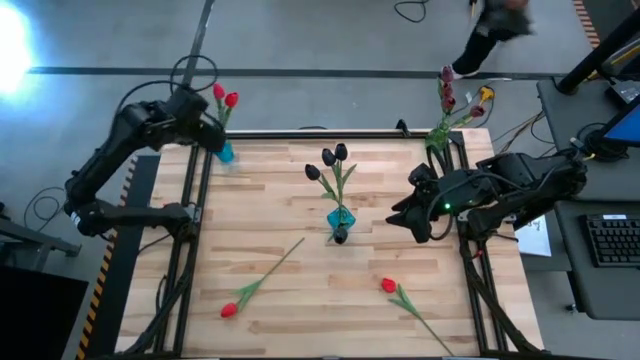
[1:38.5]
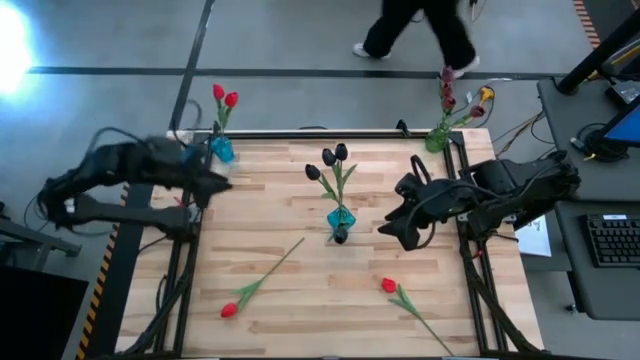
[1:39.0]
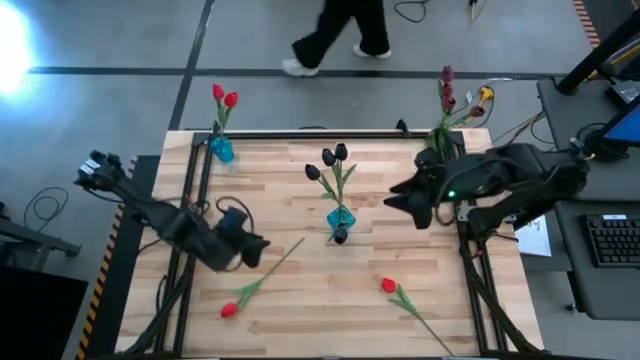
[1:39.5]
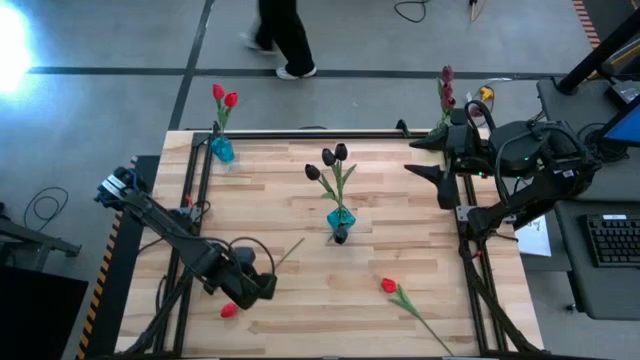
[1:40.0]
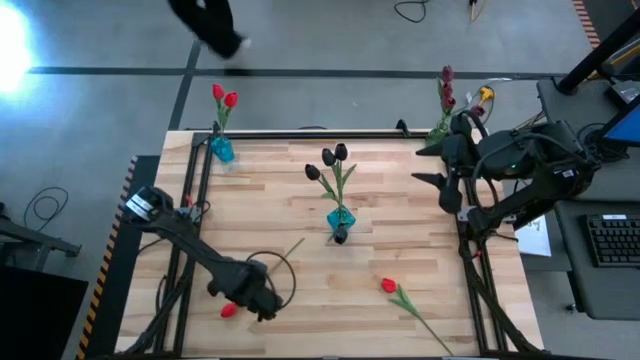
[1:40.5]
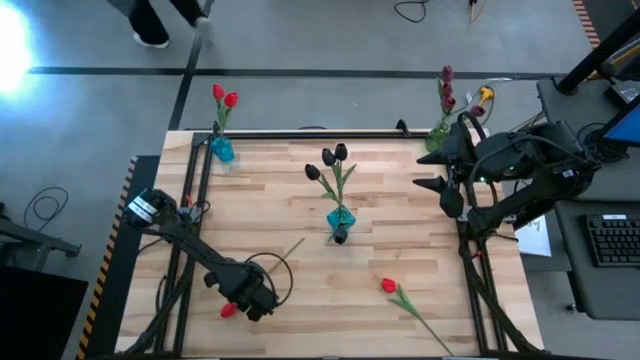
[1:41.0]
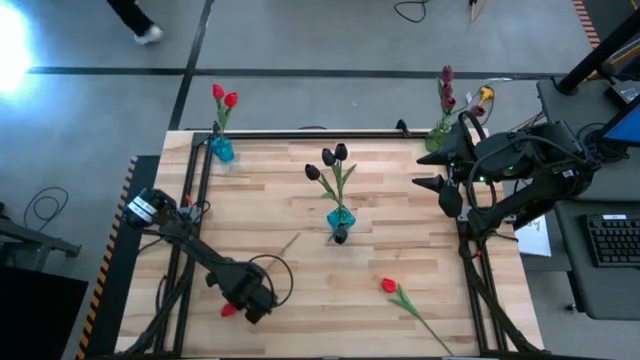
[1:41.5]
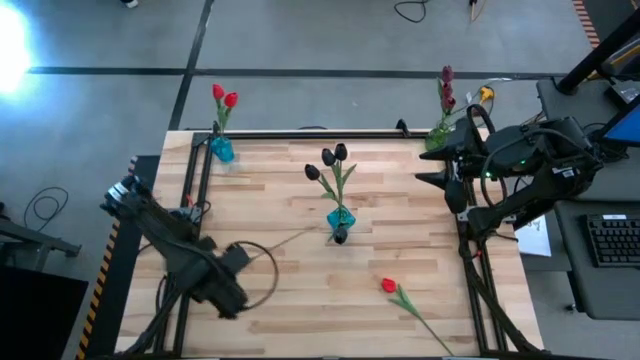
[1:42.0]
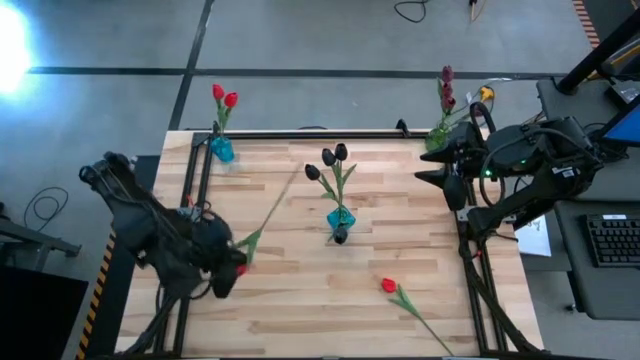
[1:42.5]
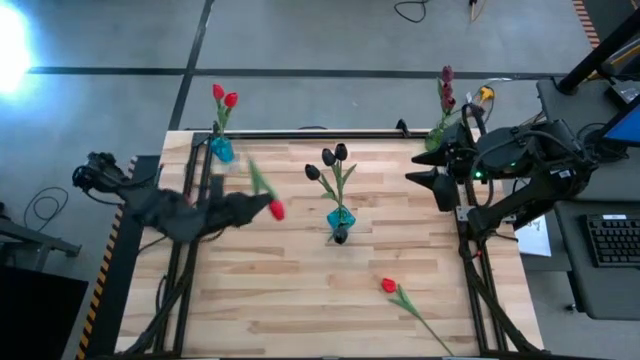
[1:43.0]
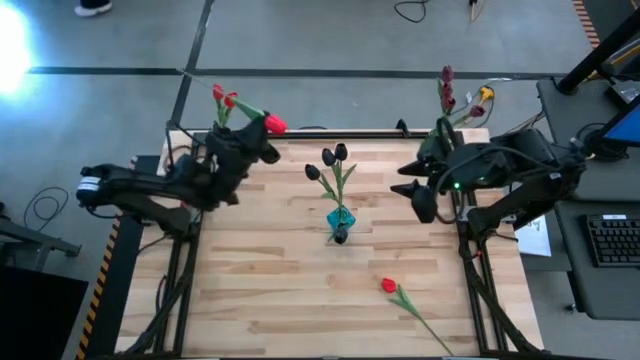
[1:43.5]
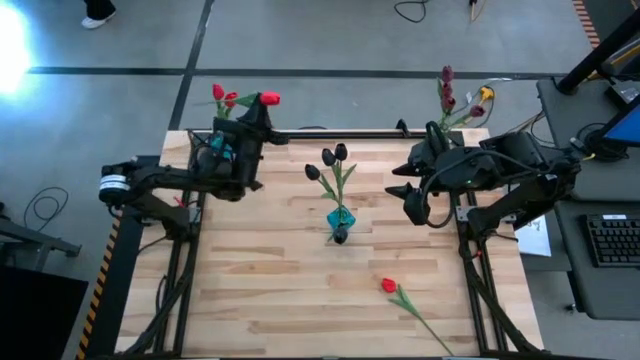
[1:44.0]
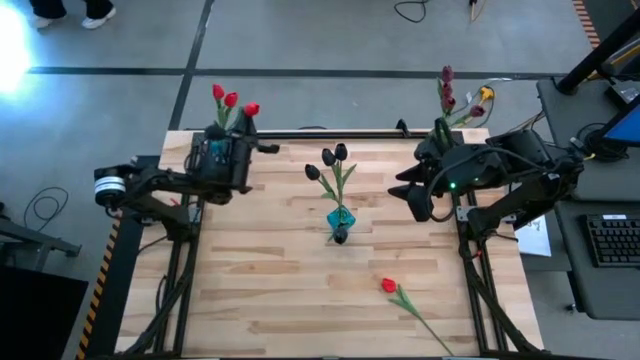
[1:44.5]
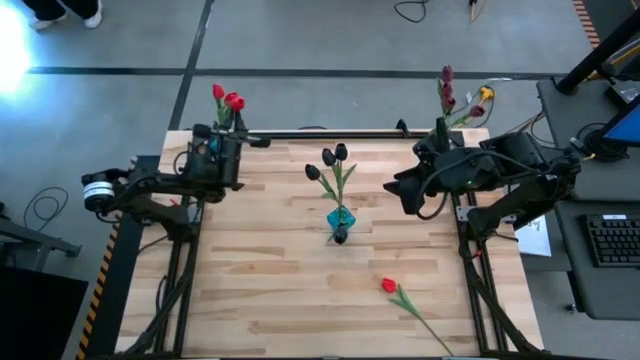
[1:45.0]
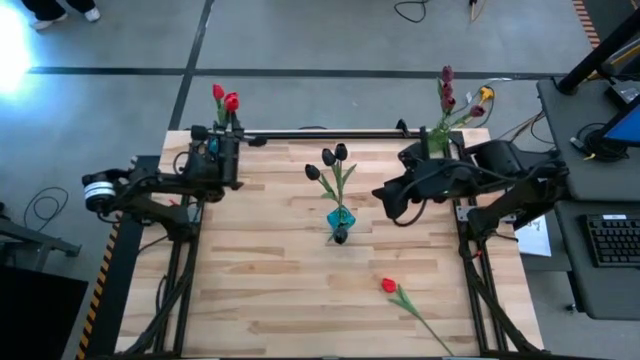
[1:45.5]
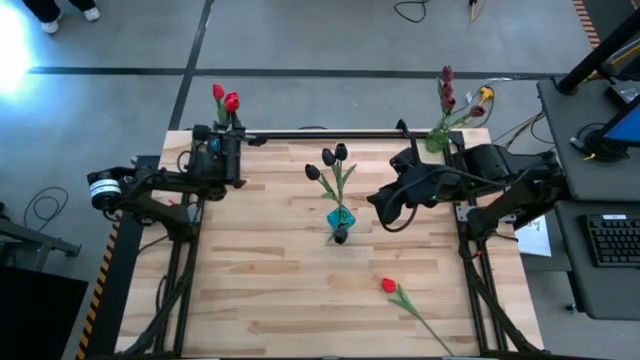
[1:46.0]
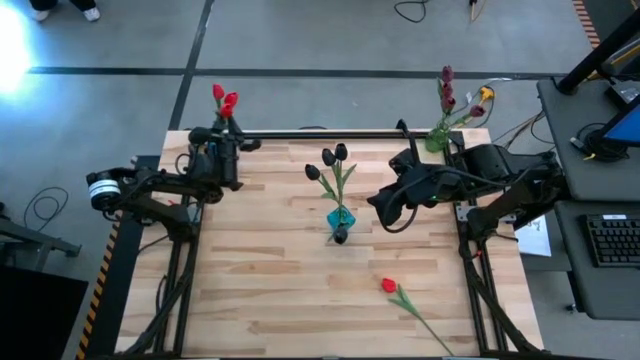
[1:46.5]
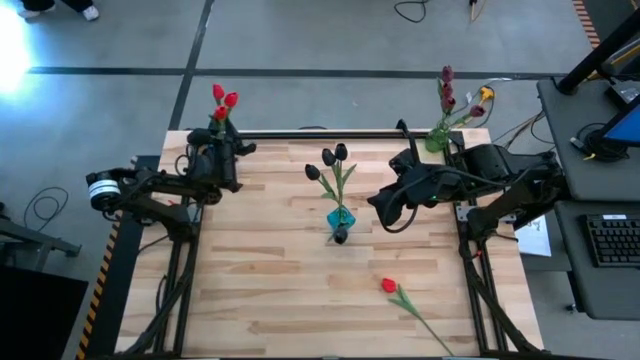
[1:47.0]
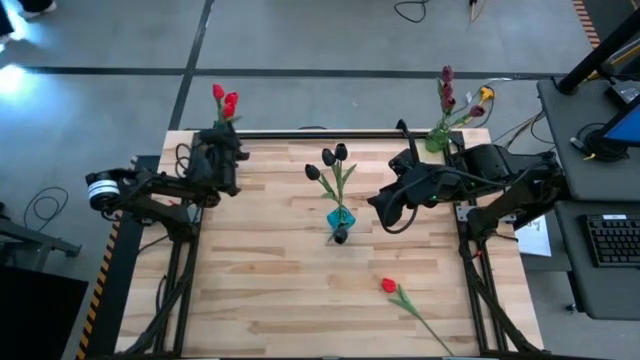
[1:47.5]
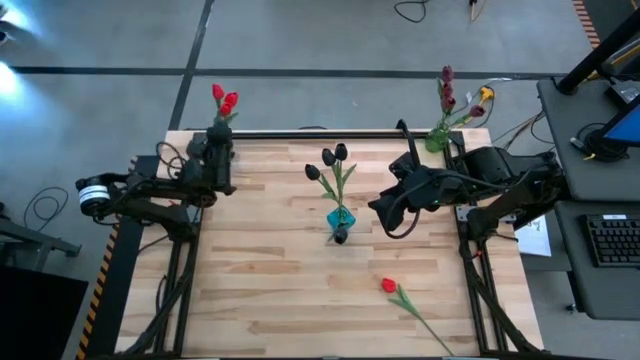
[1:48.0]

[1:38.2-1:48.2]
Task: Sort flowers into vase by color
Put the red flower into the left blue vase

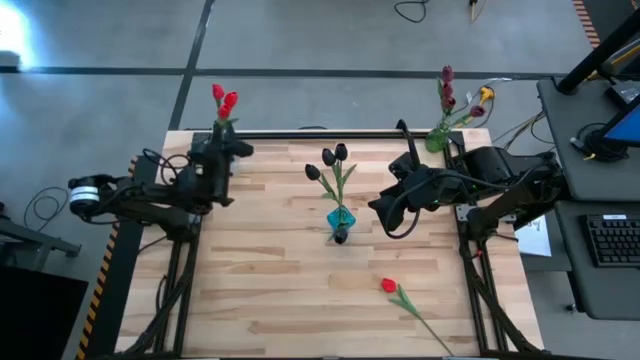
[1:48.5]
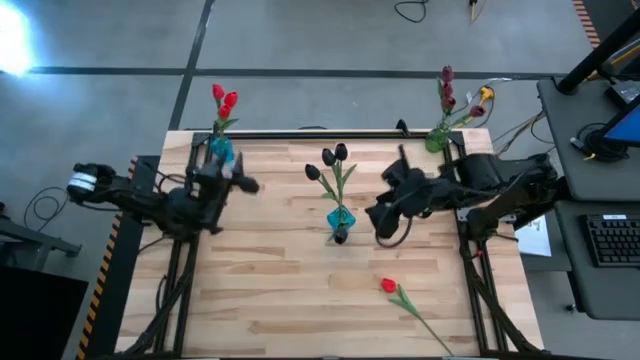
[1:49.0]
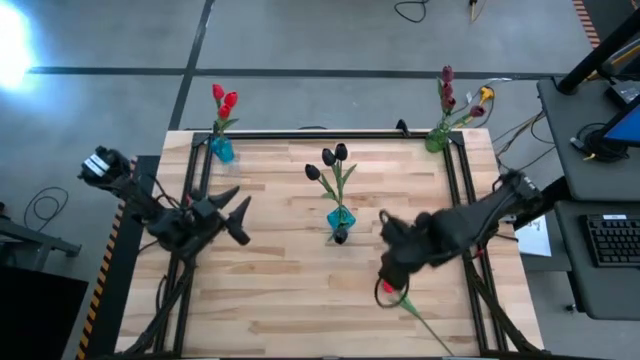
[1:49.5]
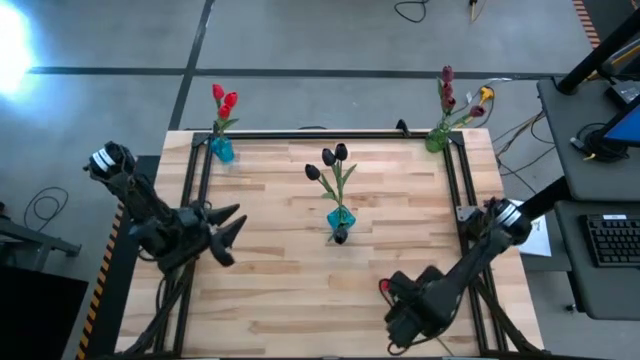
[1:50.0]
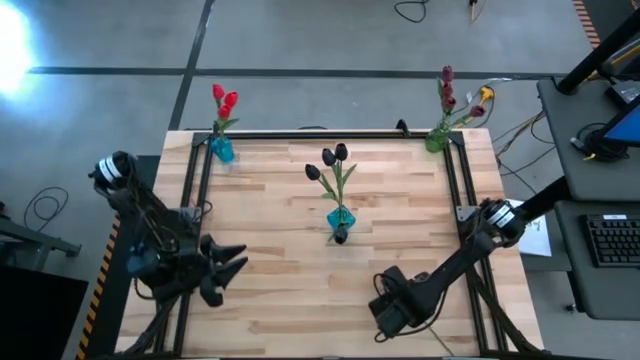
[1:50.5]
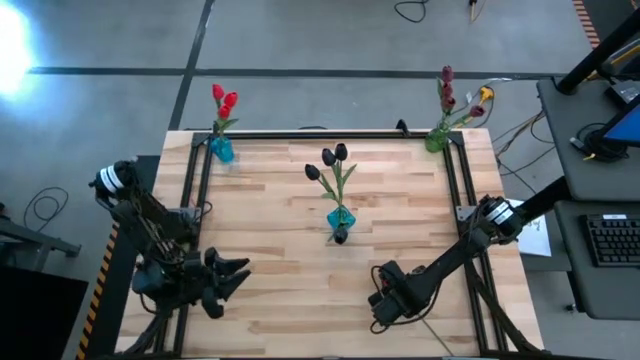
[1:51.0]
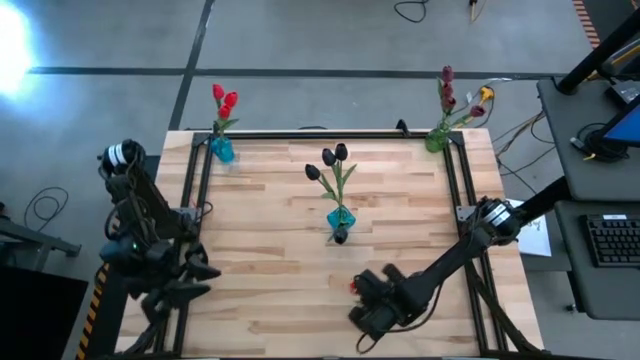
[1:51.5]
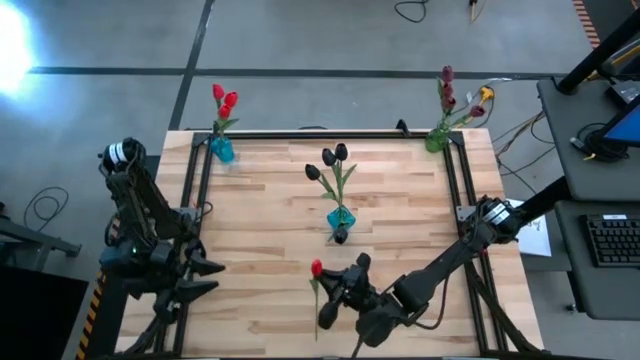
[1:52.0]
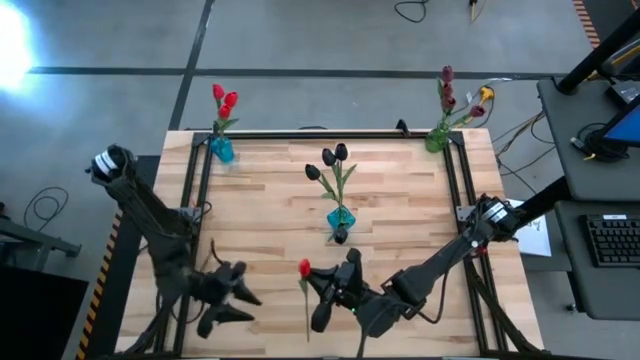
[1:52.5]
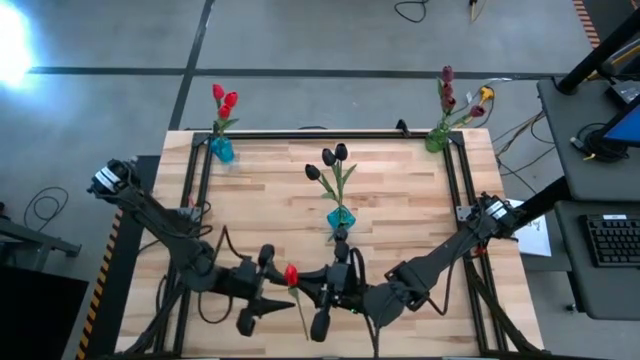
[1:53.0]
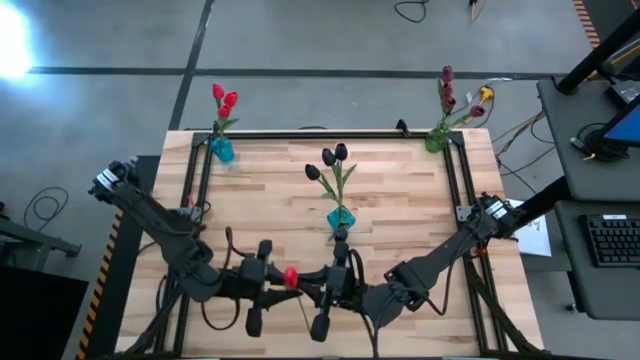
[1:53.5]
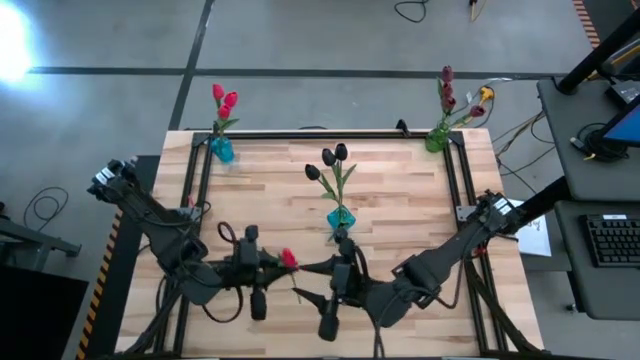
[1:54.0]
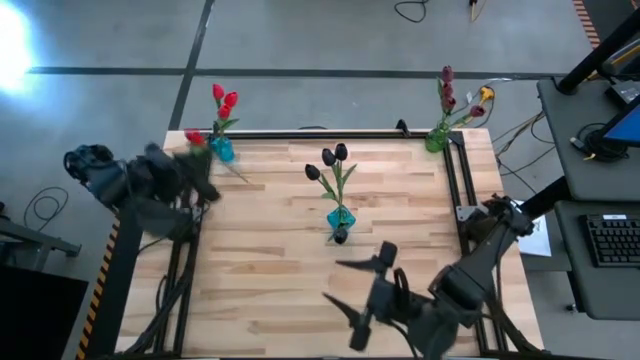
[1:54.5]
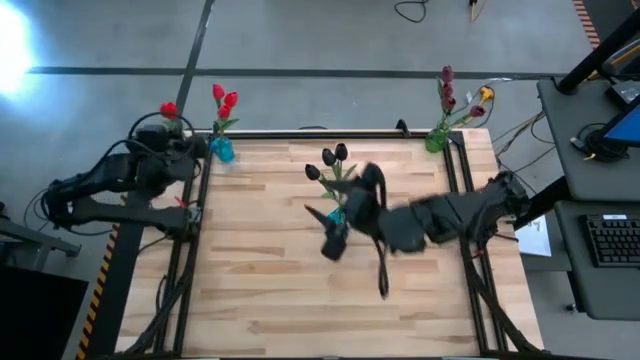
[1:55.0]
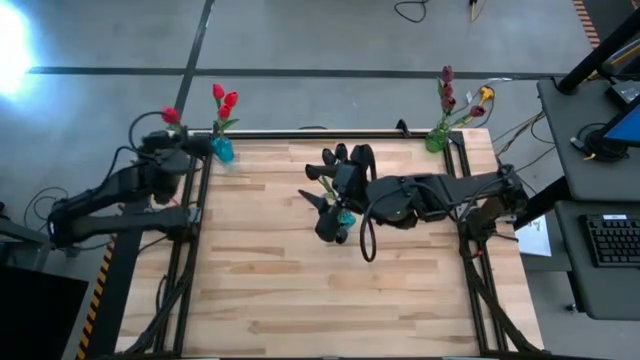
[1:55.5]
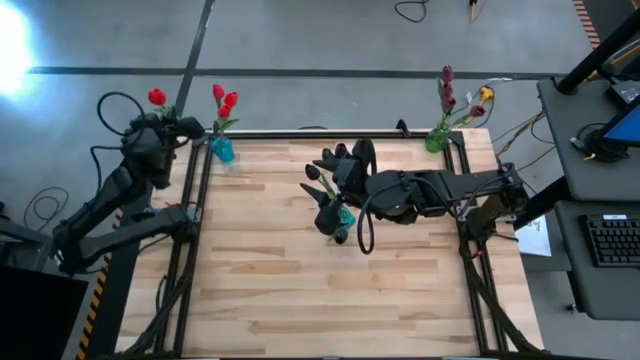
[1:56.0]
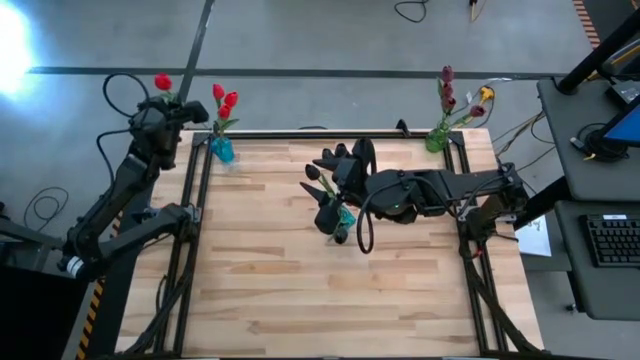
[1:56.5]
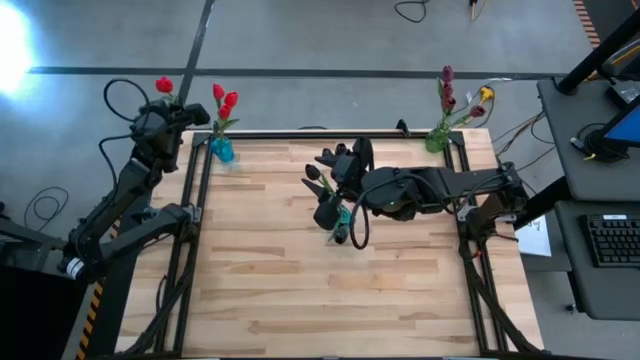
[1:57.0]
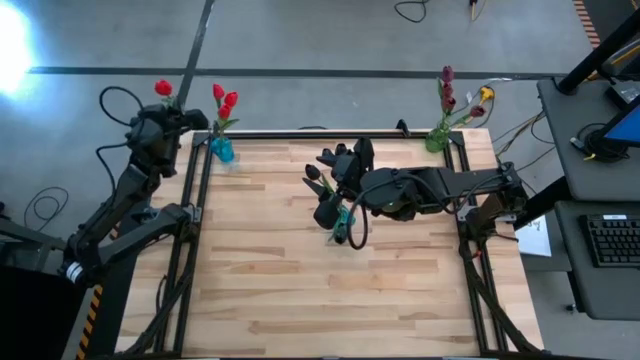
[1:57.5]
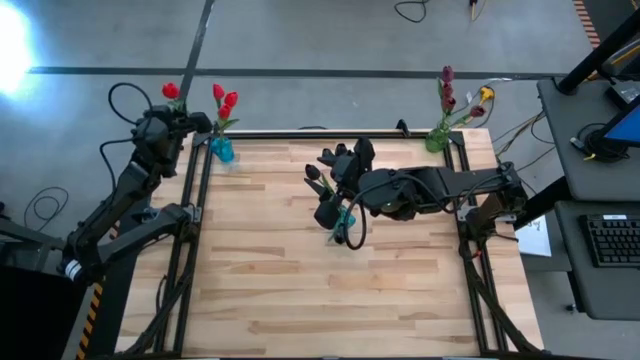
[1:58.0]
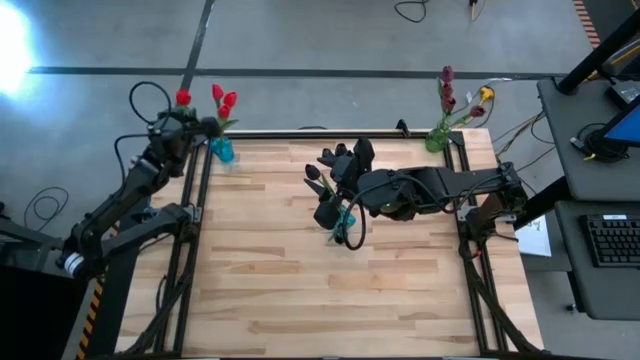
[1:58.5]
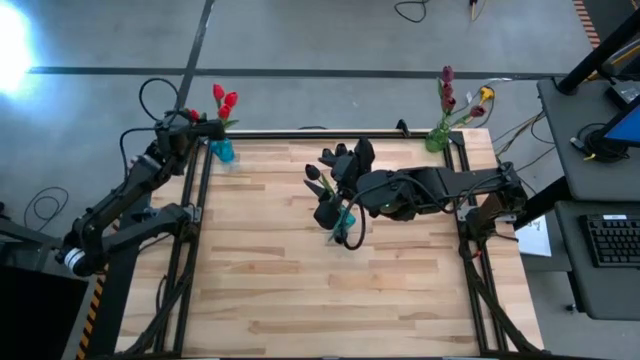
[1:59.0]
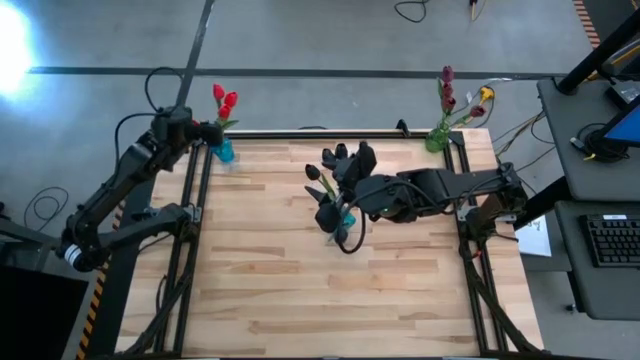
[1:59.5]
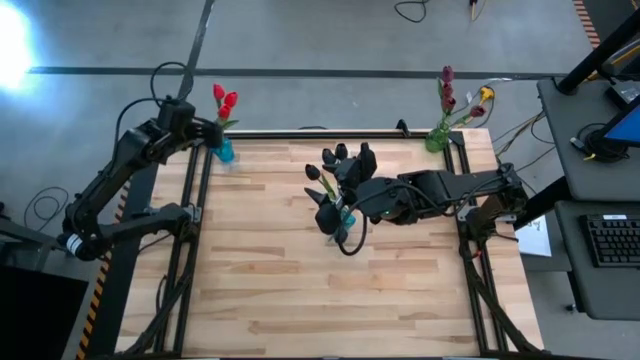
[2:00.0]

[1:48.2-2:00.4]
Put the red flower into the left blue vase
